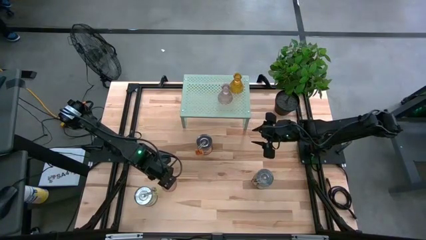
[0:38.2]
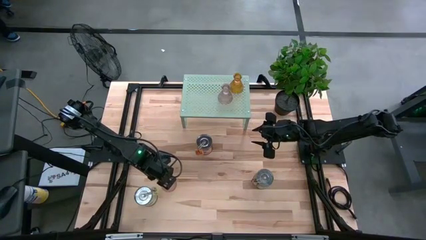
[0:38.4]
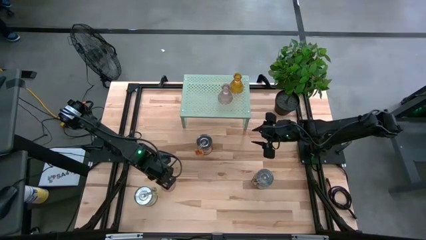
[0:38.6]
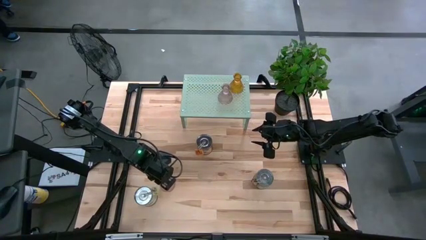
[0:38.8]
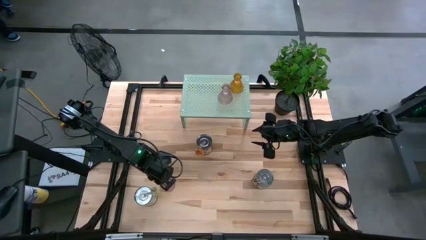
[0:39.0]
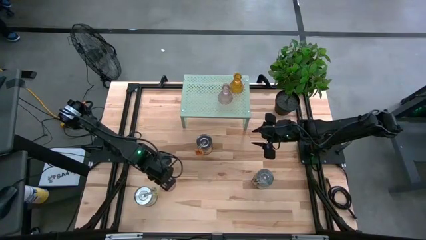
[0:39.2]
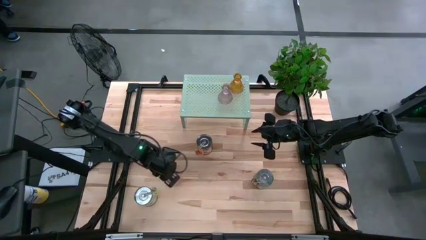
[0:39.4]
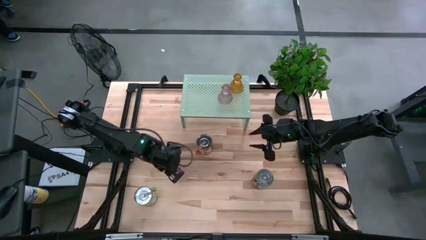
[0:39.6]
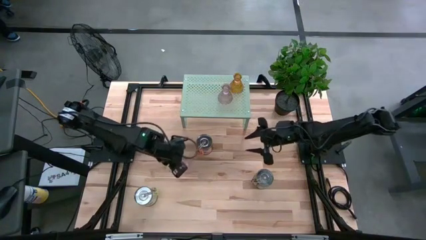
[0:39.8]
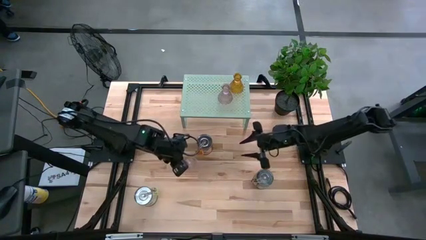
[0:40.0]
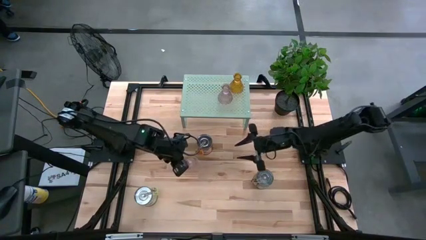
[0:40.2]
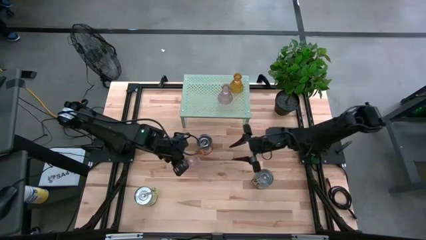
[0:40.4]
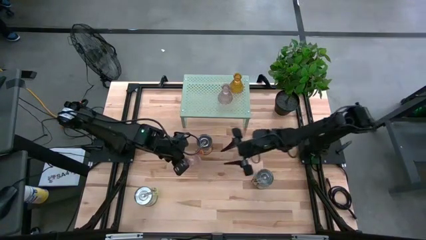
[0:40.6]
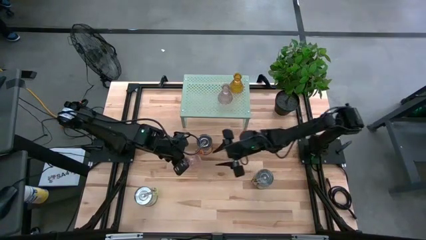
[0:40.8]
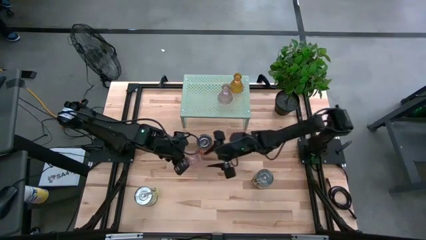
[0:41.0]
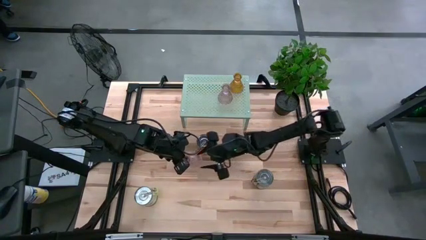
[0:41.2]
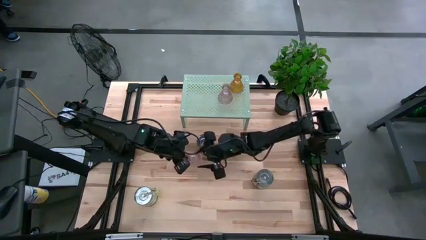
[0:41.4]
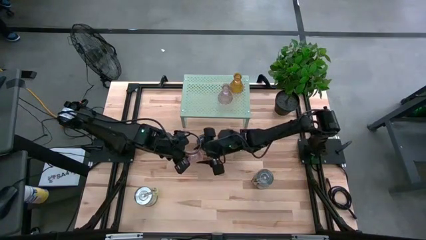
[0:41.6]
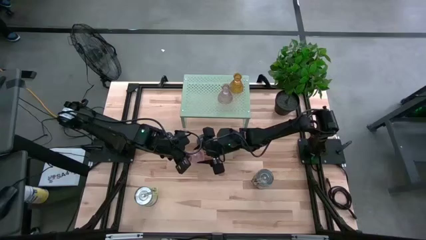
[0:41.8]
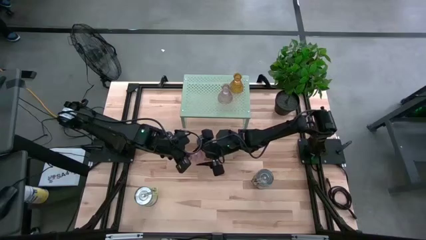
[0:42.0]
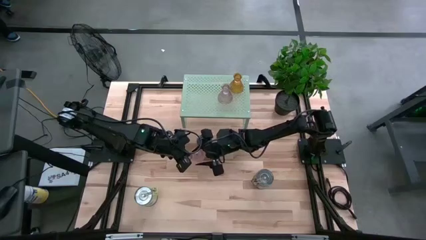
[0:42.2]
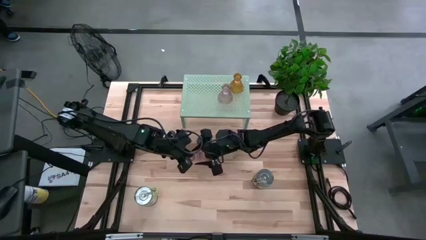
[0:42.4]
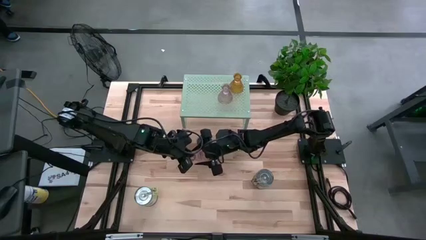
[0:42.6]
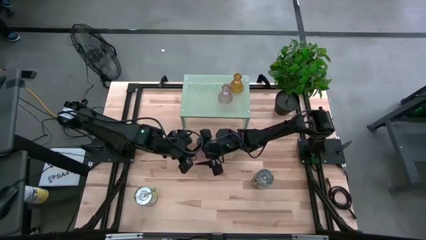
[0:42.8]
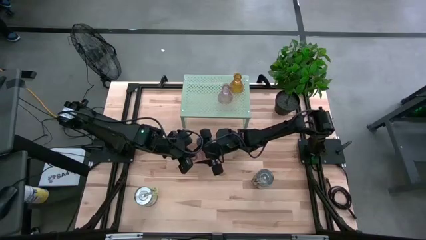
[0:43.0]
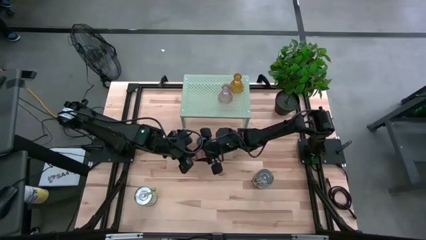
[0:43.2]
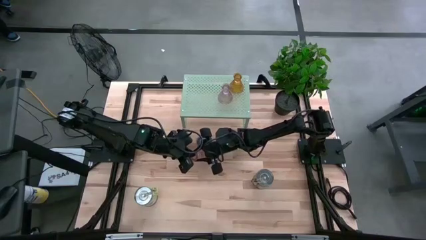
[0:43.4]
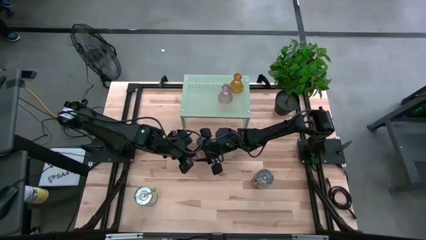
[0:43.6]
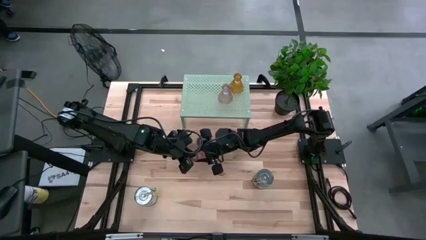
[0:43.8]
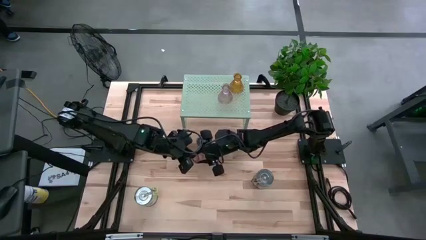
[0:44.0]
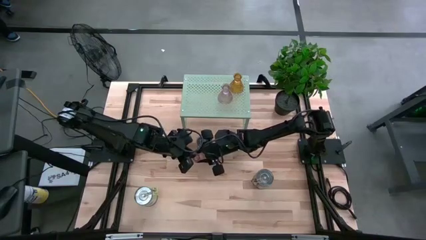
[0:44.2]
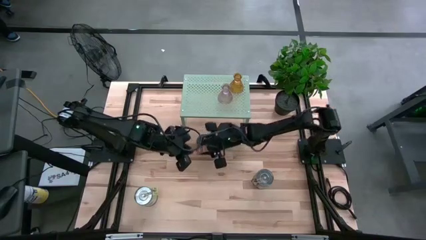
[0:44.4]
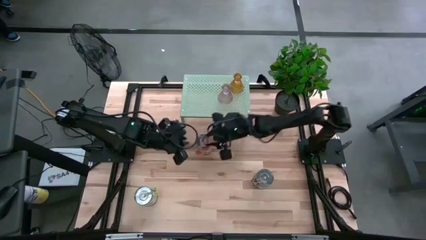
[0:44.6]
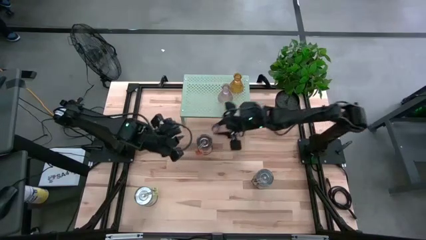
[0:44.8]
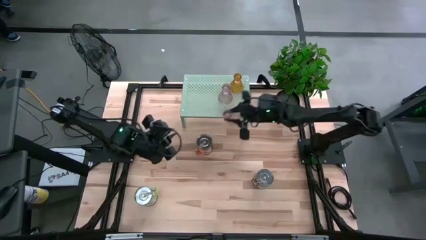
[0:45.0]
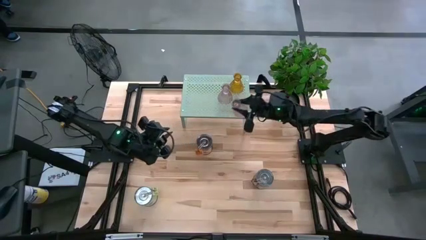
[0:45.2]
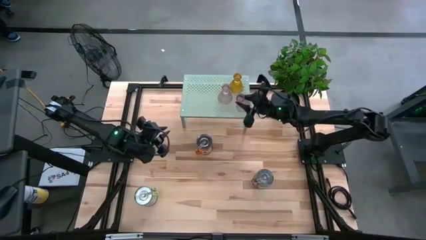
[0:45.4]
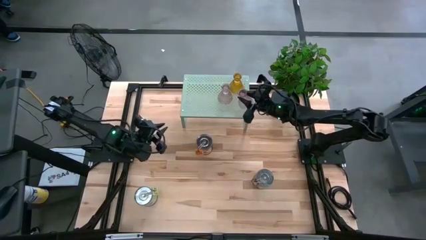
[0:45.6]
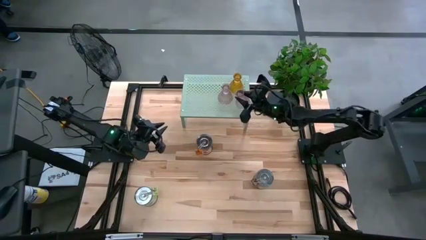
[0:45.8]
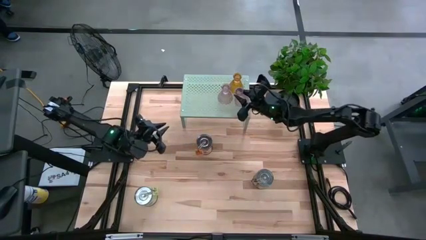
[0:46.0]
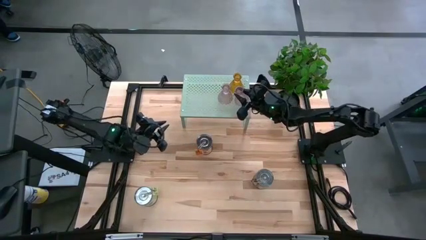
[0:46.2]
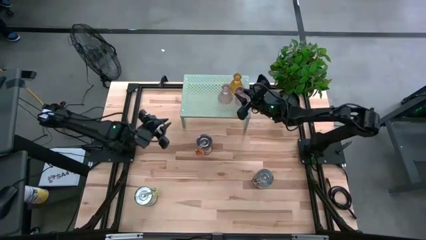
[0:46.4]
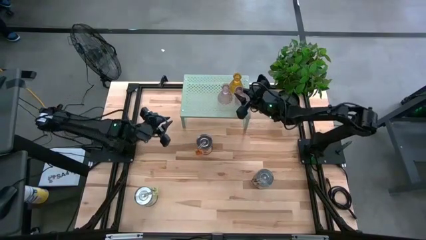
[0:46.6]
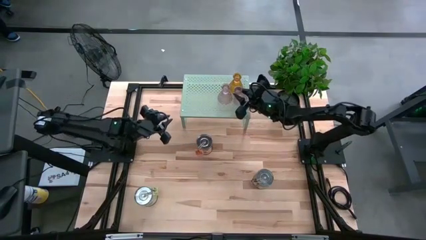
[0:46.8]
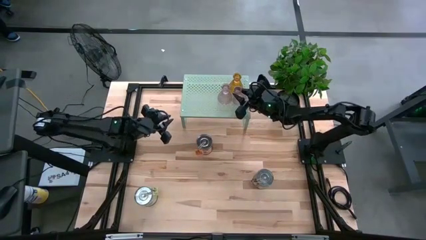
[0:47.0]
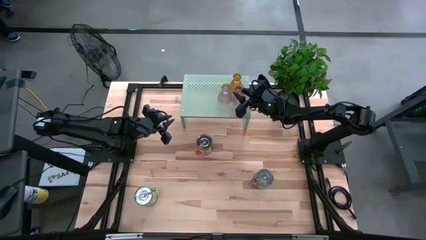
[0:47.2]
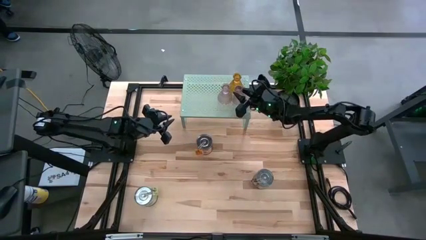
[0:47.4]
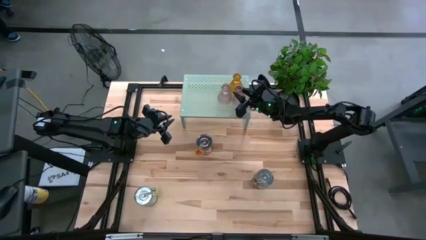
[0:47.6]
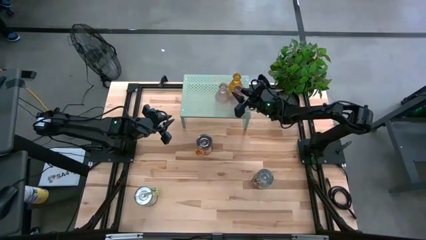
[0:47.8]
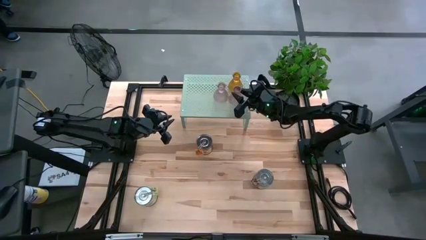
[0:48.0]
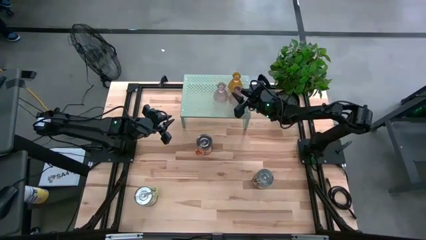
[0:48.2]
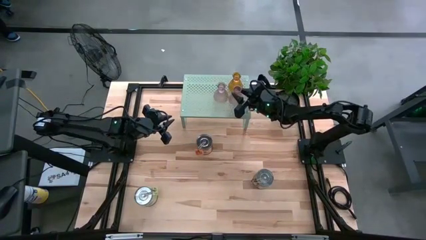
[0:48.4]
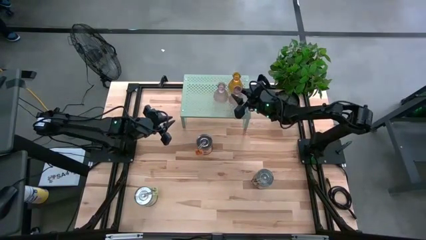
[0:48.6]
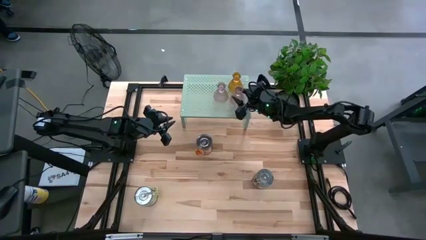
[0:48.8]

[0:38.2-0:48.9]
Task: Pick & Place candle stick holders
Put the purple glass candle holder on the shelf
